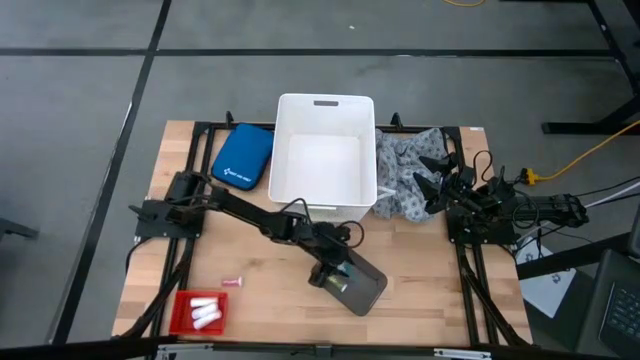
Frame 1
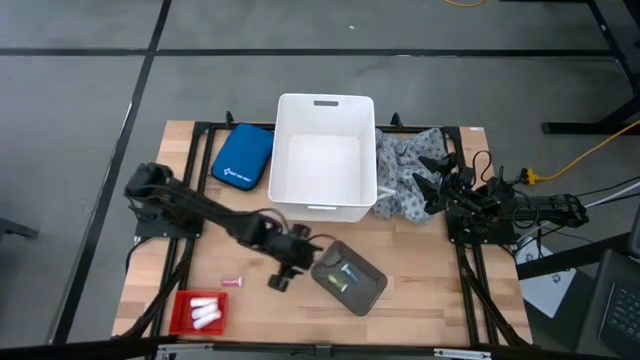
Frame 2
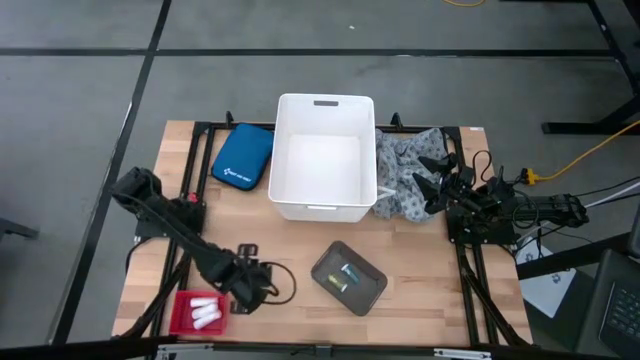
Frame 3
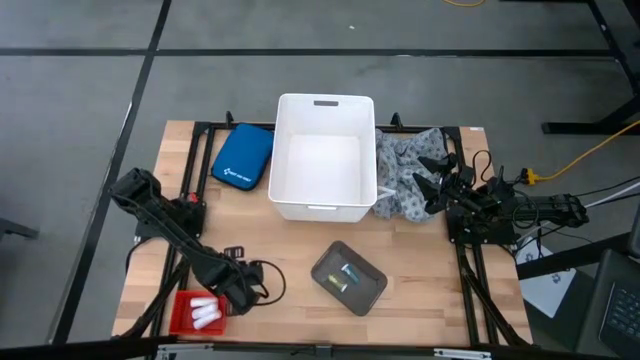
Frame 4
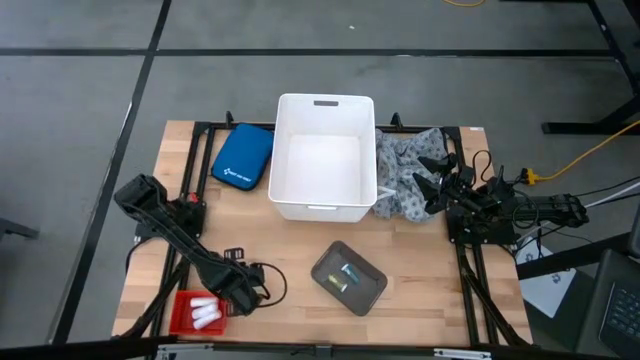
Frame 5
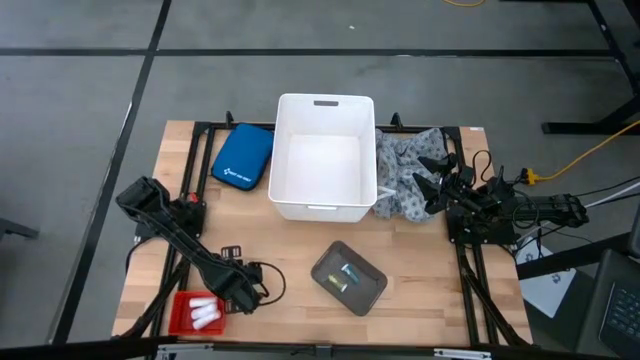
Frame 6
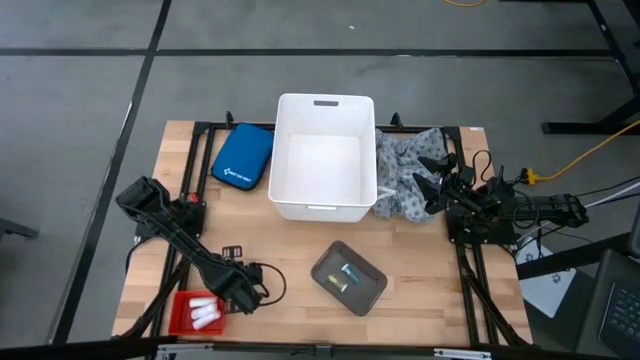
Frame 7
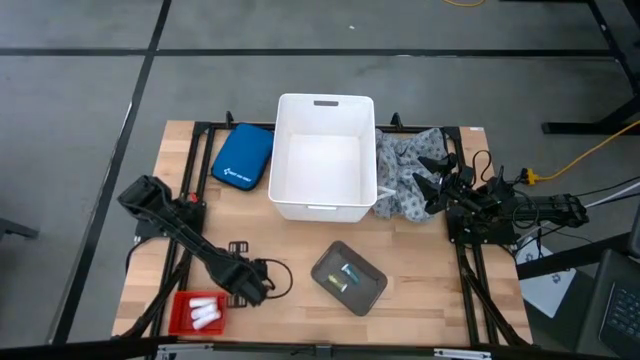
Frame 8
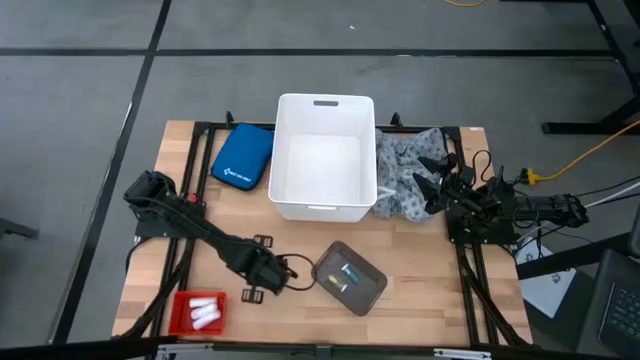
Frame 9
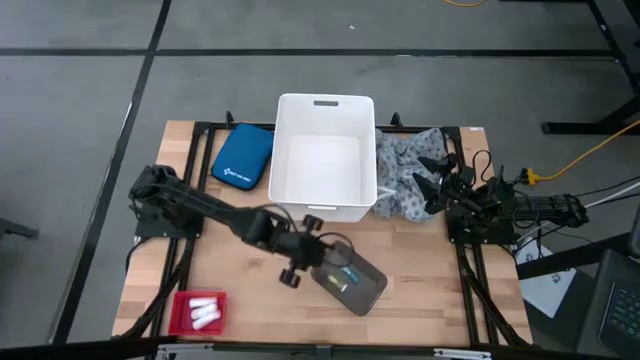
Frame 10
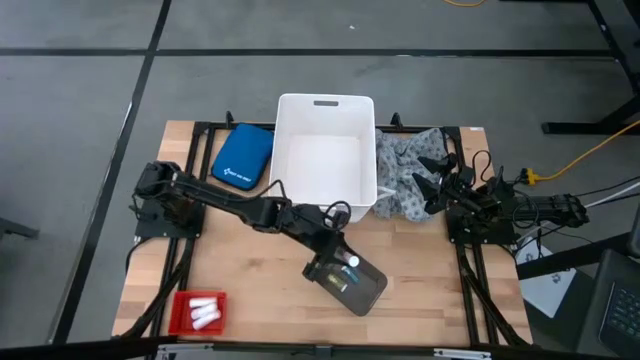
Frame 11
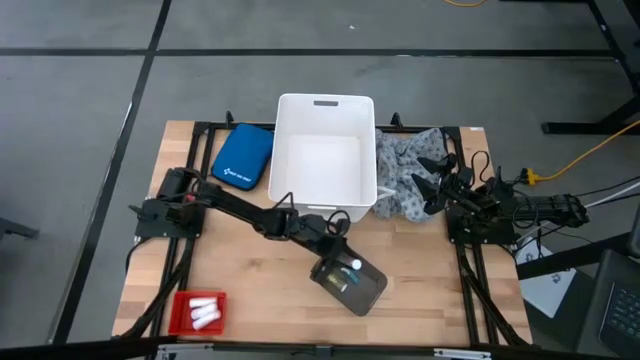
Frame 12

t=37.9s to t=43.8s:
Task: Pick & place medical supplies in basket/bin
Put the pink pill bottle into the black bin

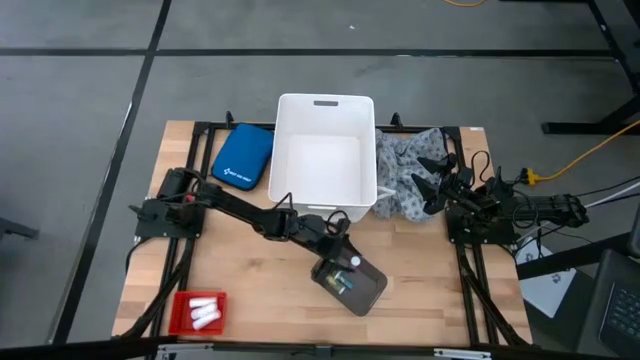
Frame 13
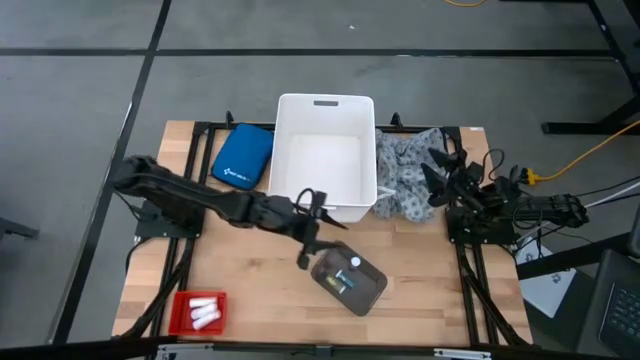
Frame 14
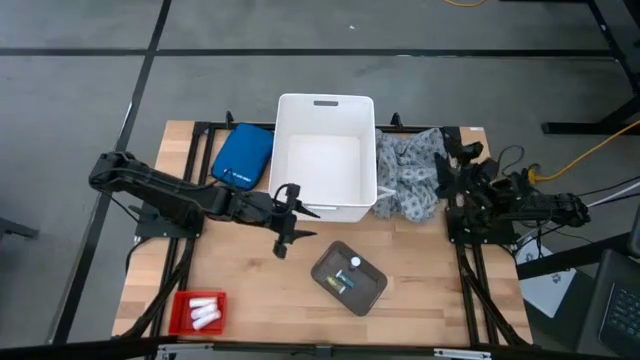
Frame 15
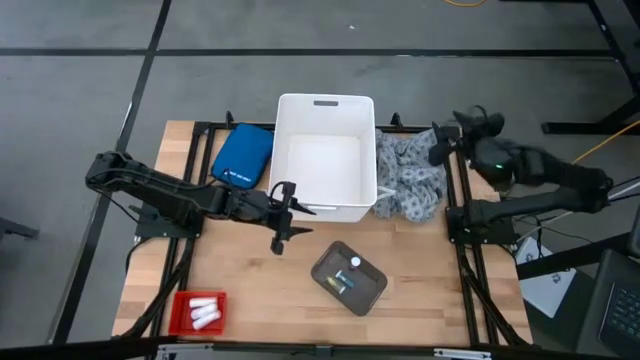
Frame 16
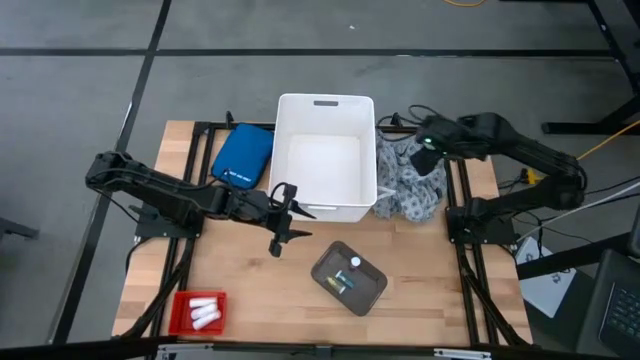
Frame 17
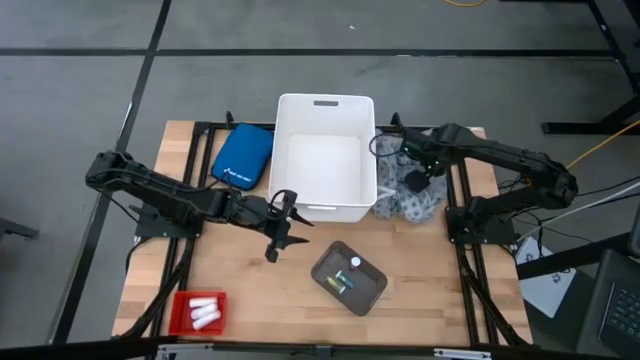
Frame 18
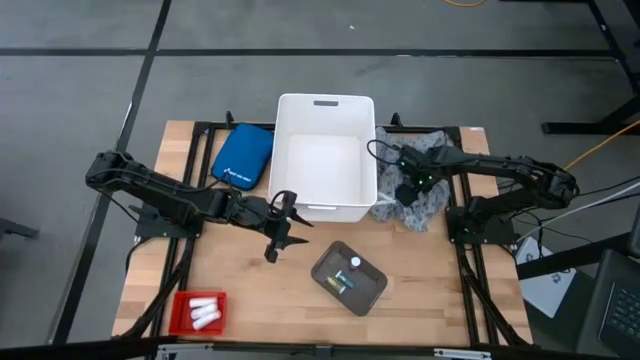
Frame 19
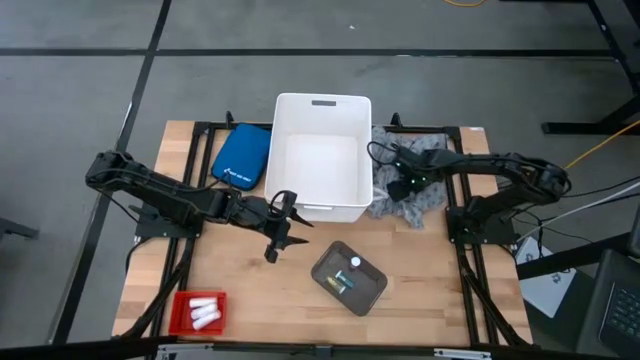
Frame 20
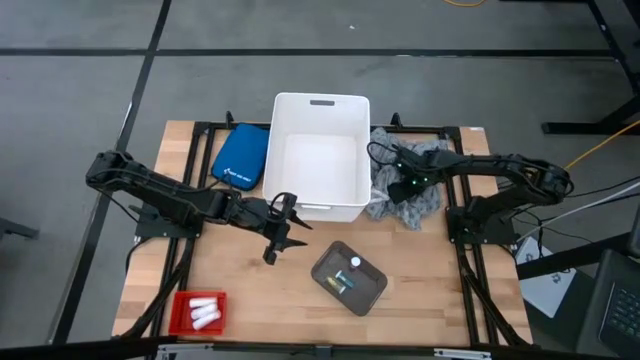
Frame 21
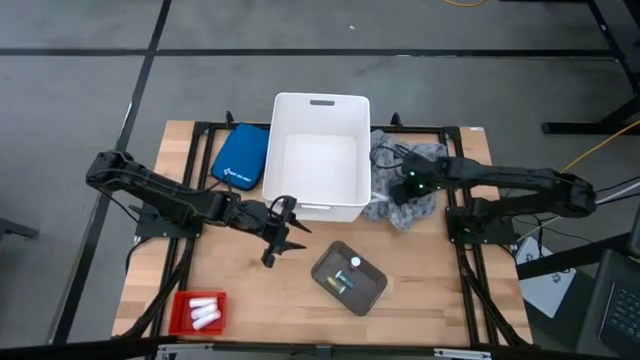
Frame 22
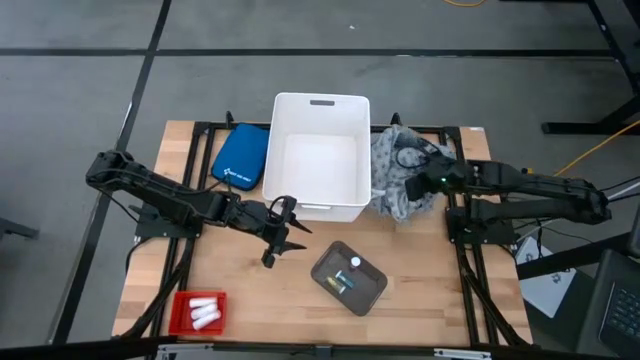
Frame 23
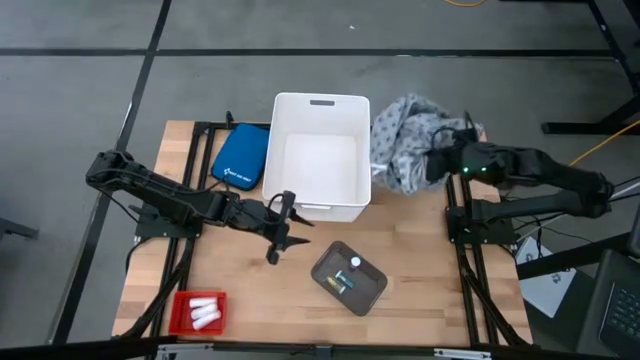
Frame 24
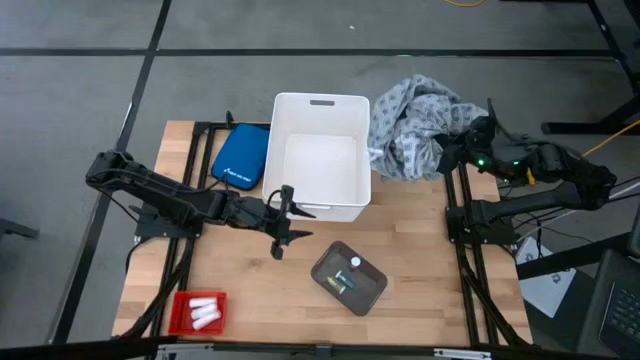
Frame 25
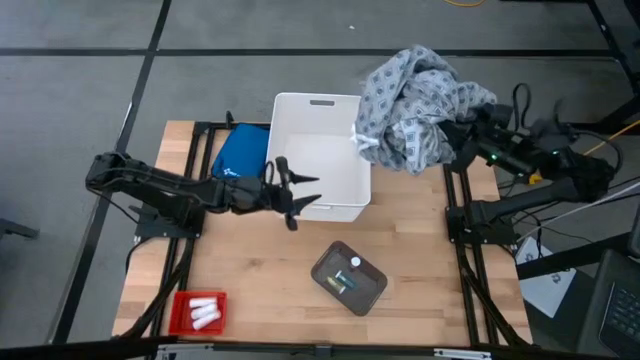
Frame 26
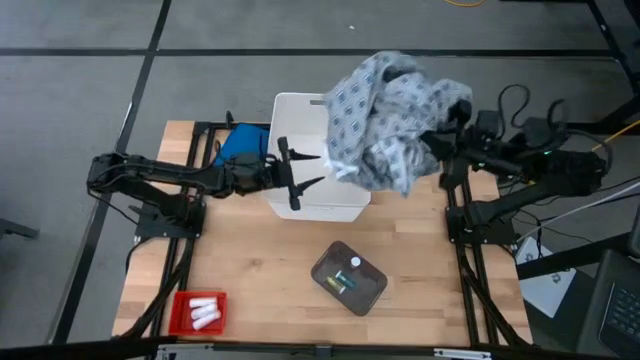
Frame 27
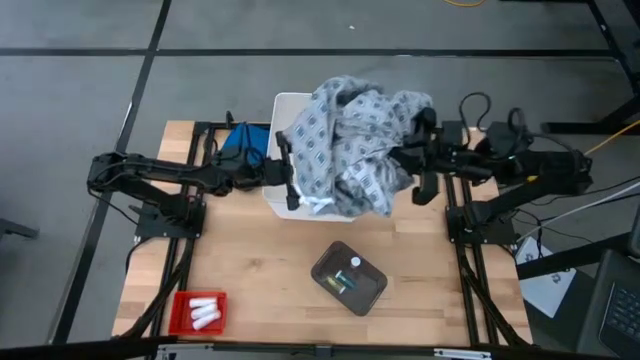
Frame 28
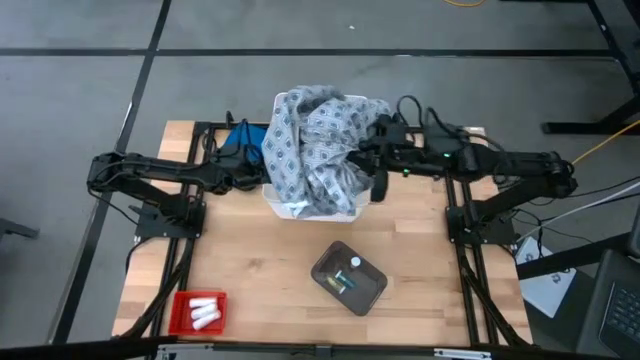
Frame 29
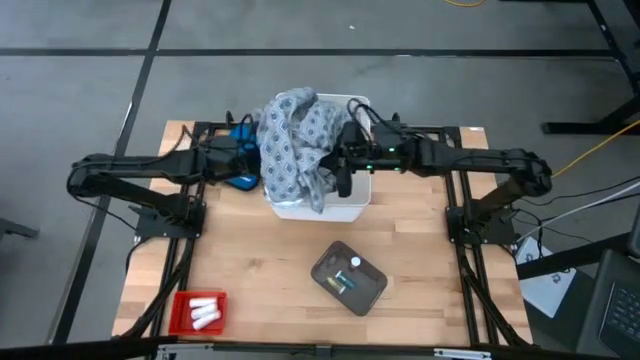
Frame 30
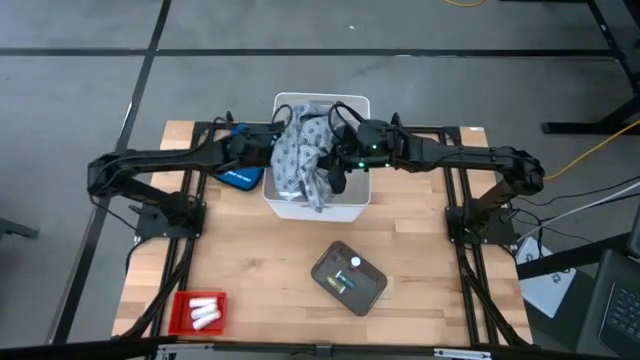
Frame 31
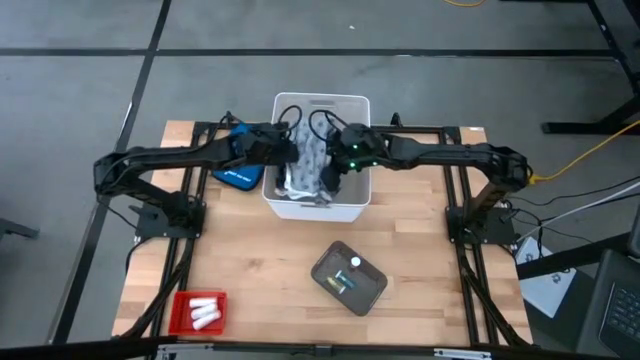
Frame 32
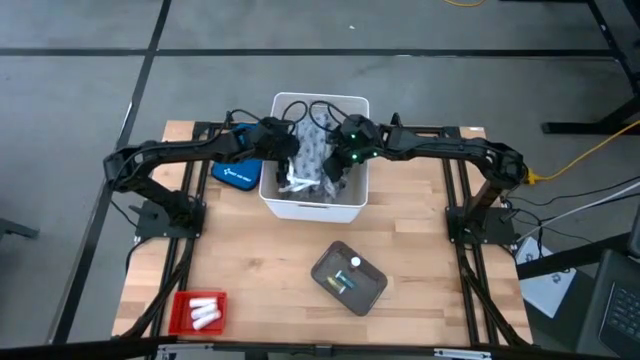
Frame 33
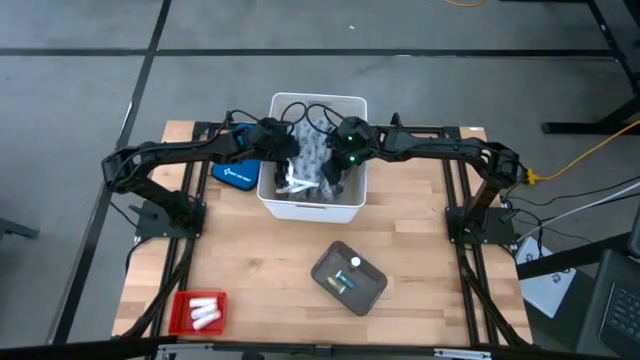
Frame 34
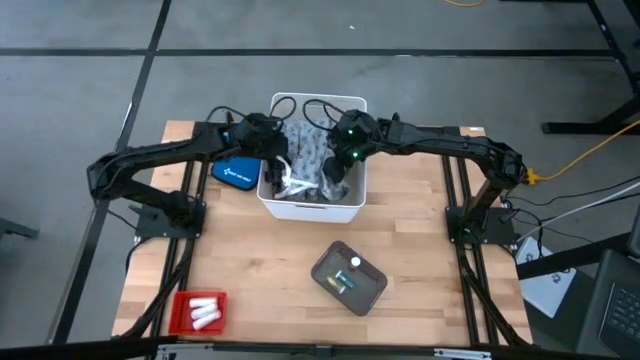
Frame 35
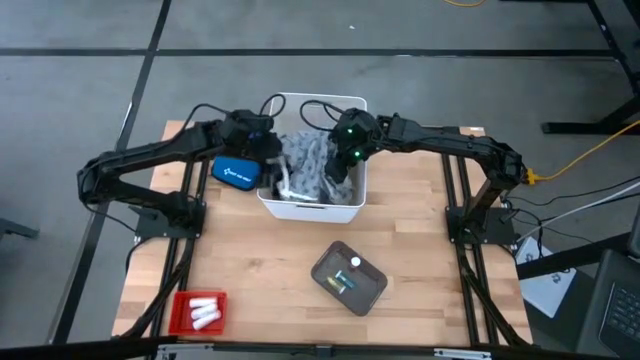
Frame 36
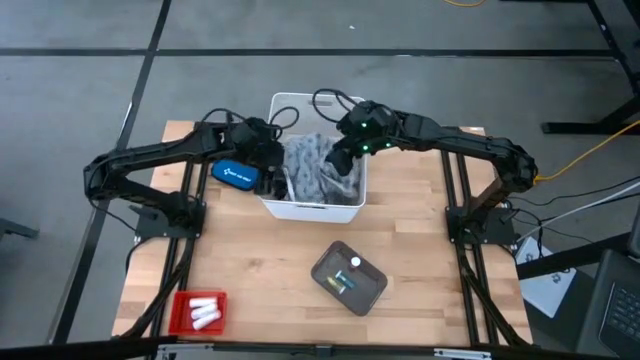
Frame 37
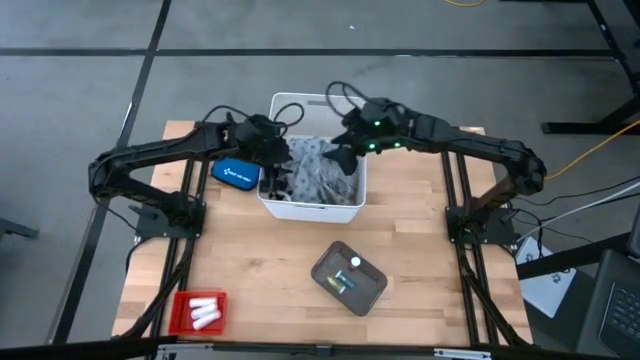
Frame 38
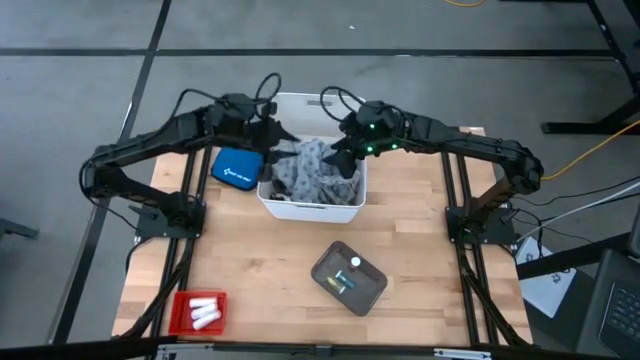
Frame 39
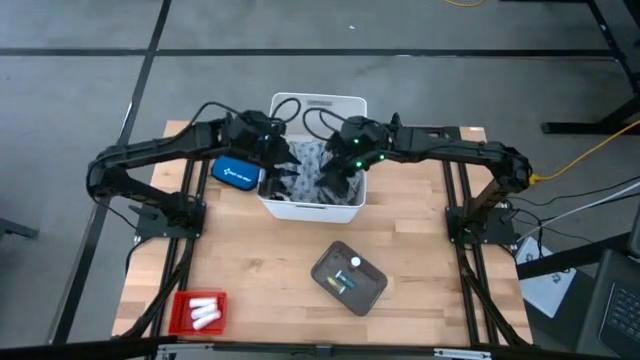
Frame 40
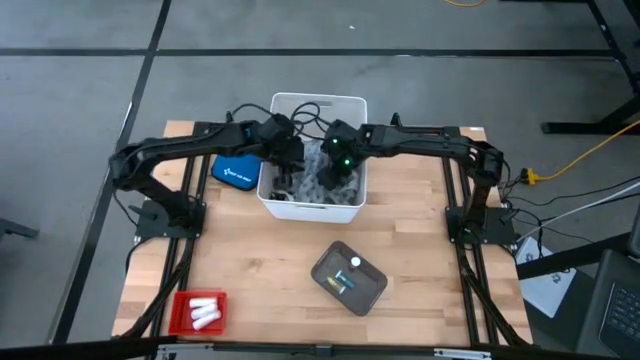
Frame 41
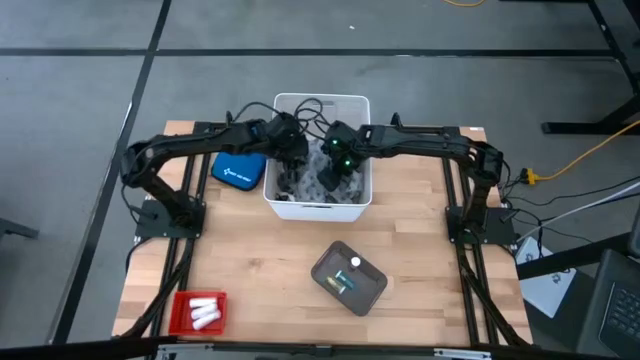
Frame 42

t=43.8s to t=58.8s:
Put the gray patient gown into the white organizer bin
